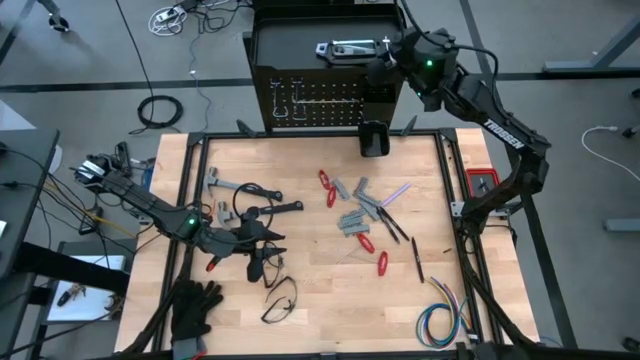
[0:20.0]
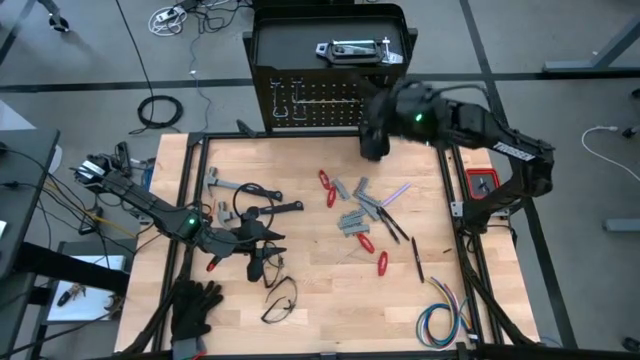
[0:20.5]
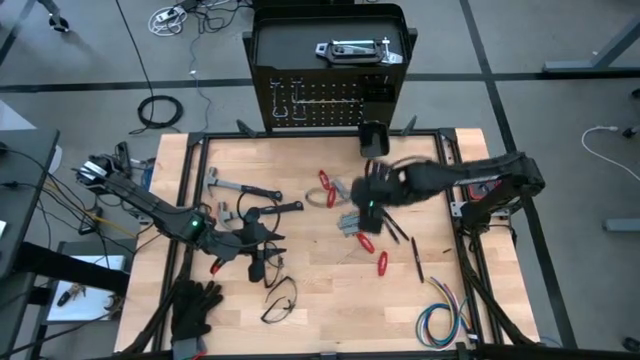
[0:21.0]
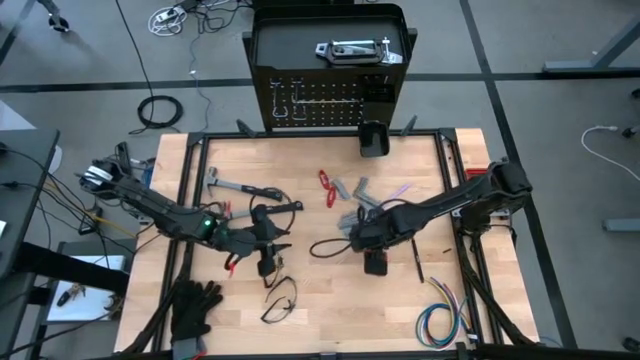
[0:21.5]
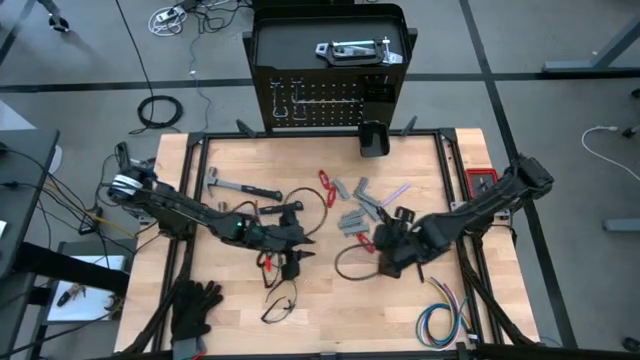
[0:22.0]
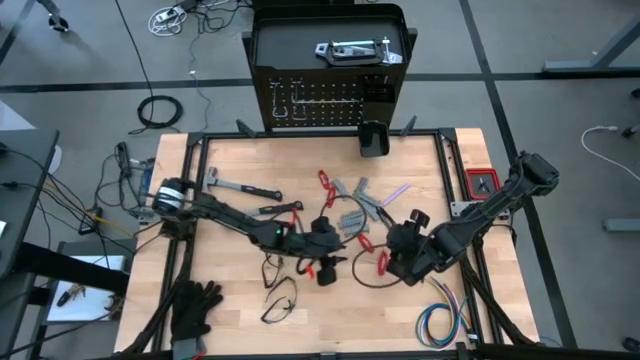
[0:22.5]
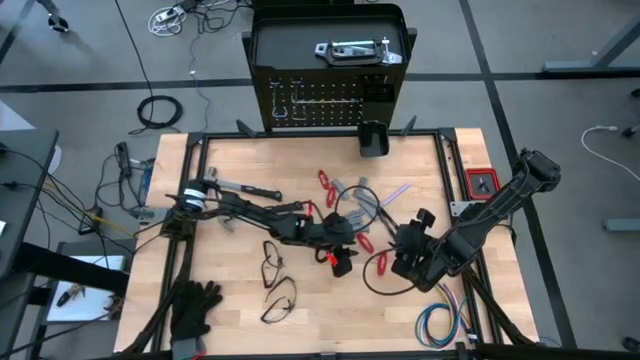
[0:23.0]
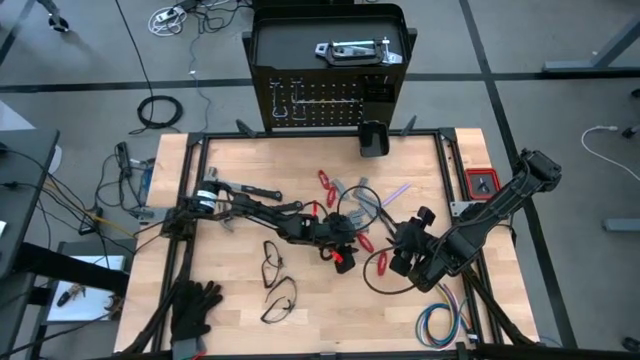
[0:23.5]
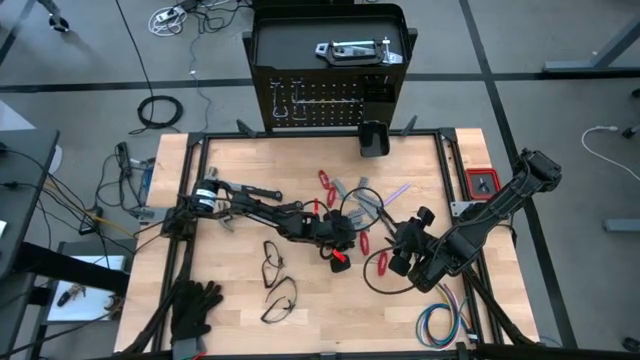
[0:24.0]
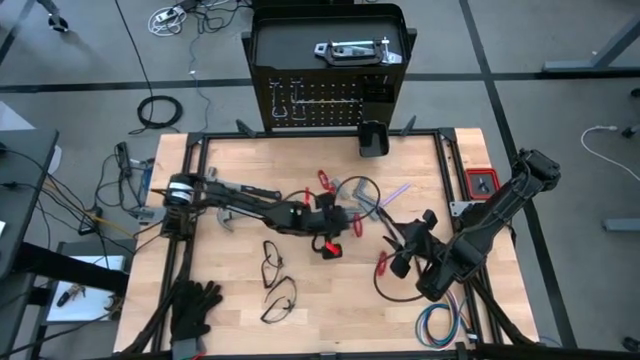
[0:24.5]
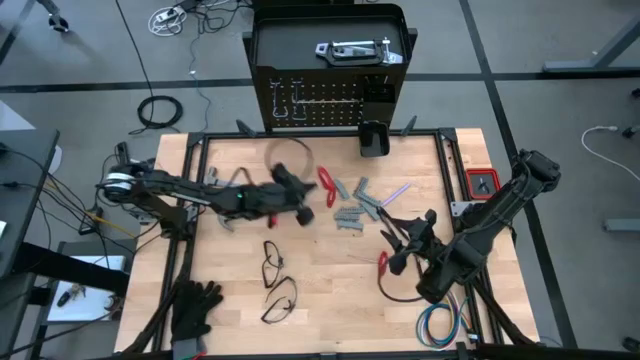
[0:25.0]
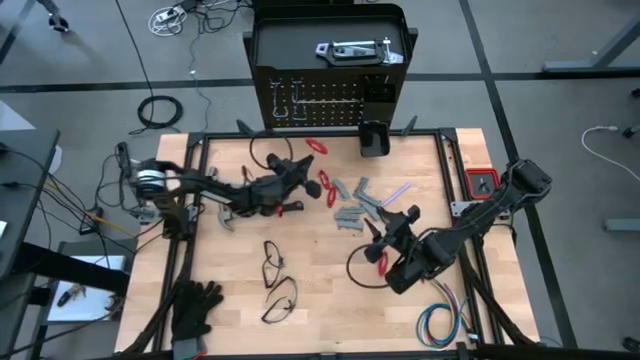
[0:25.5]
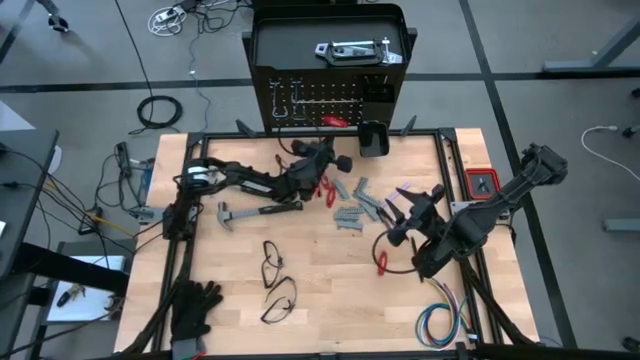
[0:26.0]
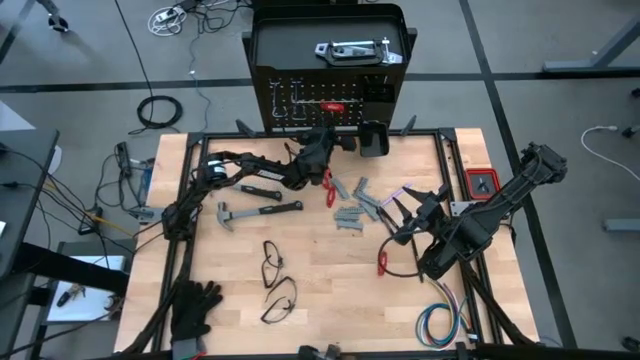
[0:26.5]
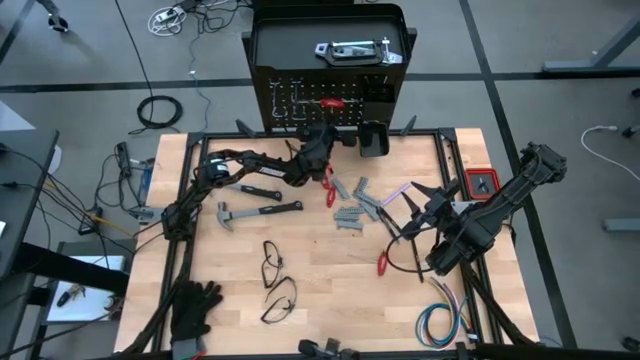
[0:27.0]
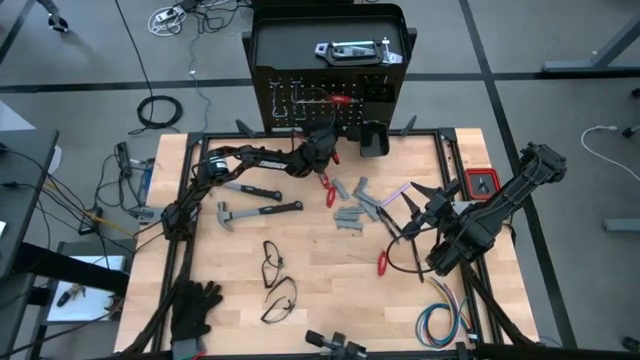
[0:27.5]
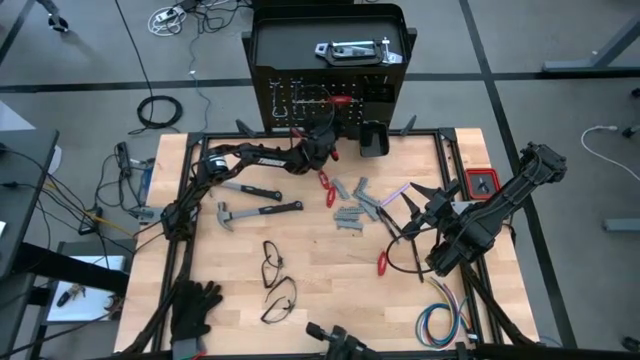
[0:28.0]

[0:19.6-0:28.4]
Task: Hang tools onto peg board
Hang the center T-shaped metric hex key on the pegboard

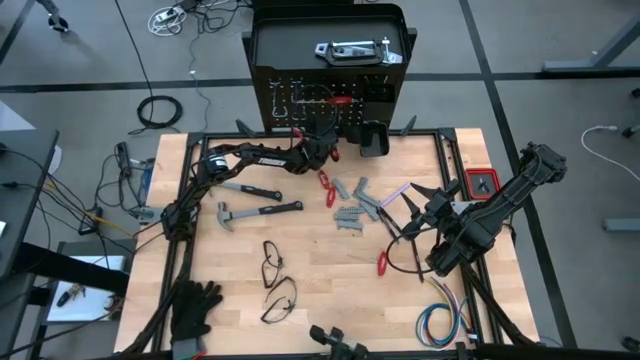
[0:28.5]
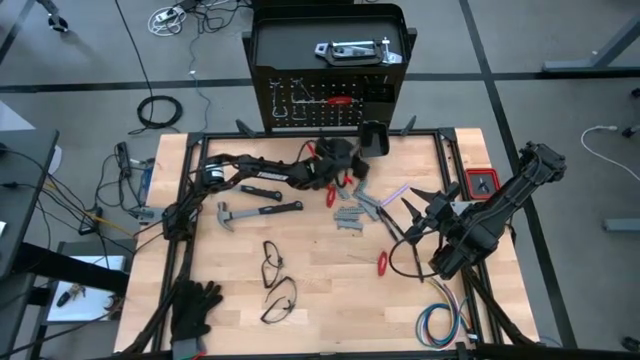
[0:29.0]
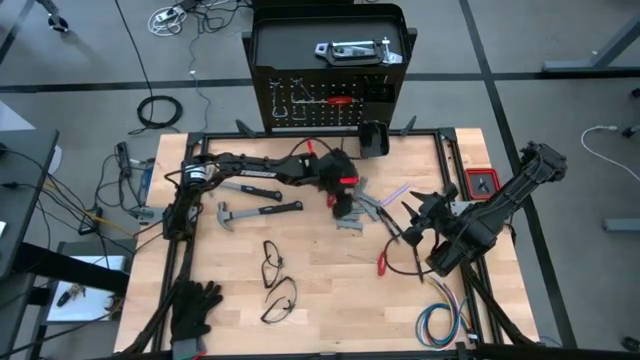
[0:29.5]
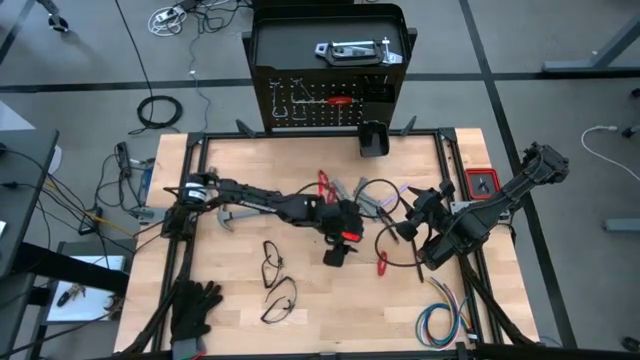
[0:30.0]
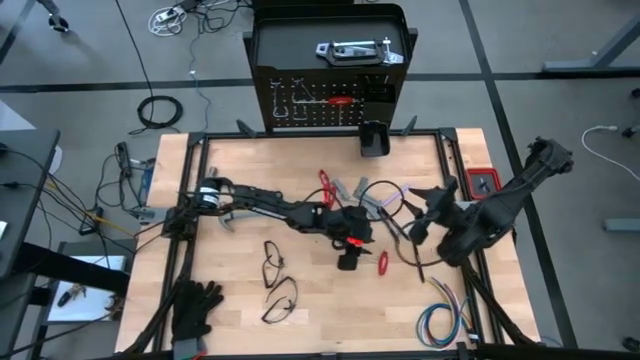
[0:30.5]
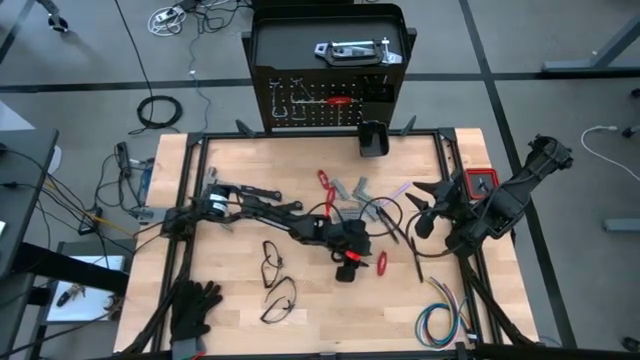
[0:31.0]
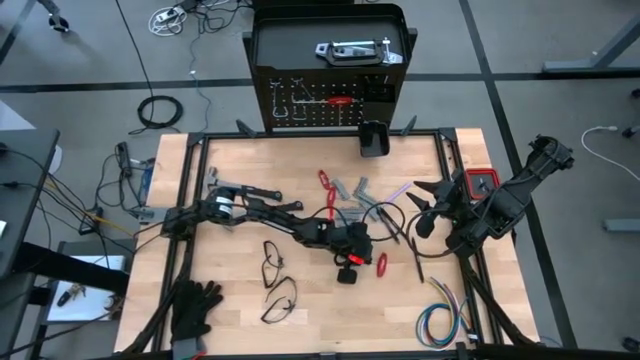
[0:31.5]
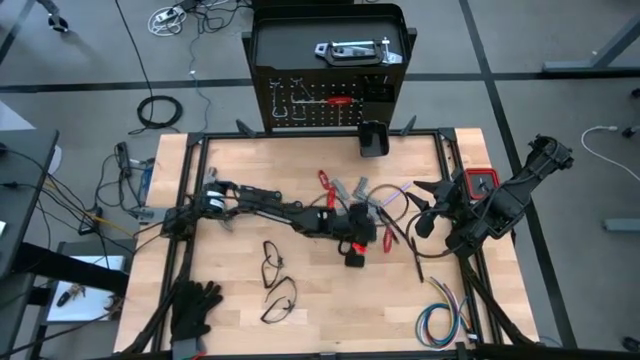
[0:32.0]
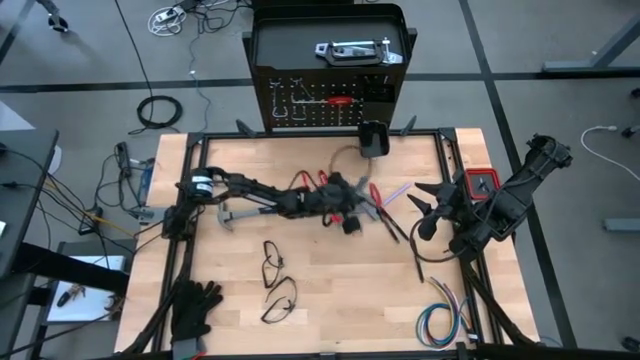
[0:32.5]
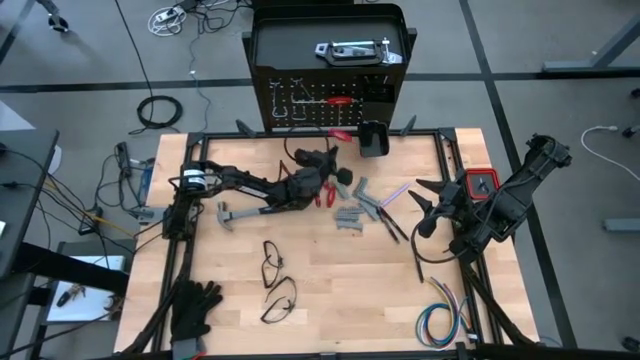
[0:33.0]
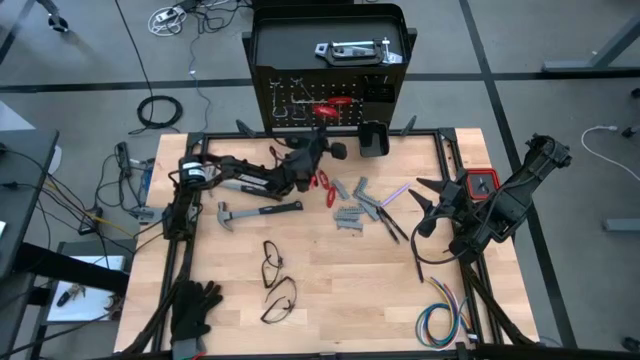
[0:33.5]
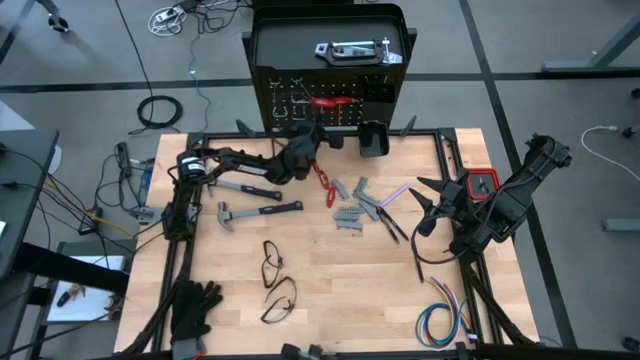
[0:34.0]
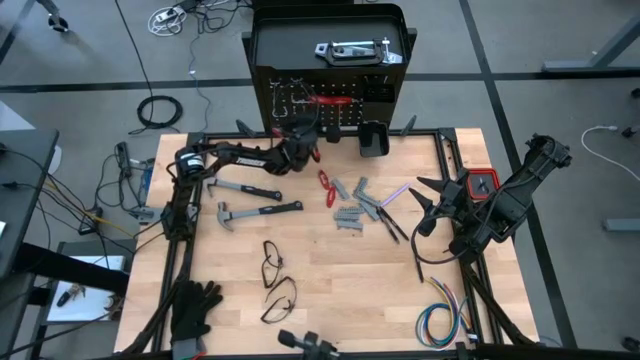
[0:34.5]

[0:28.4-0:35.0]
Hang the middle right T-shaped metric hex key on the pegboard

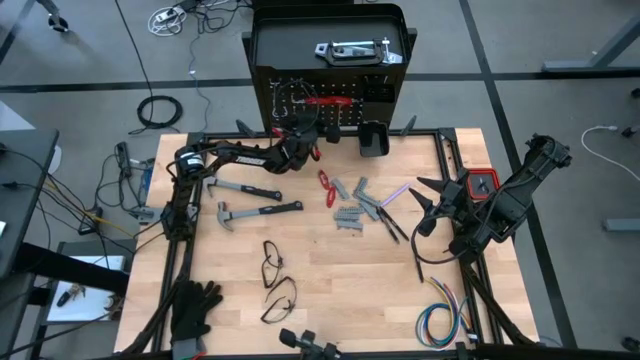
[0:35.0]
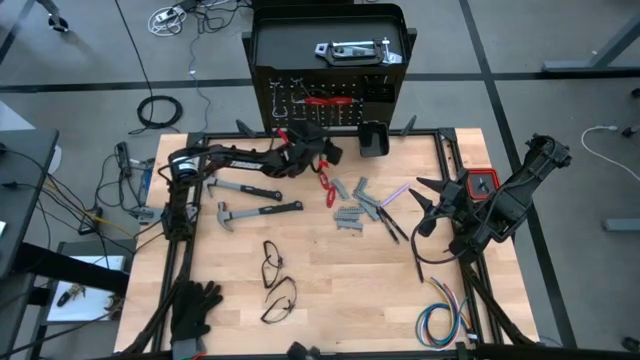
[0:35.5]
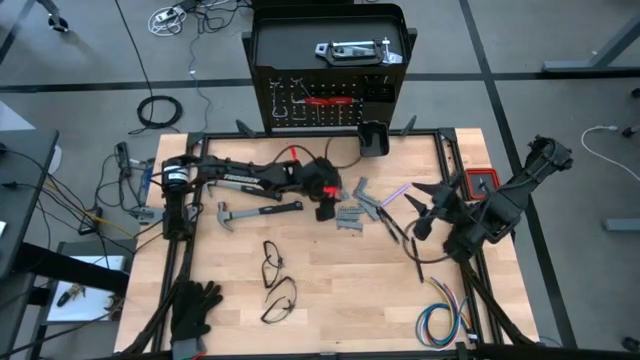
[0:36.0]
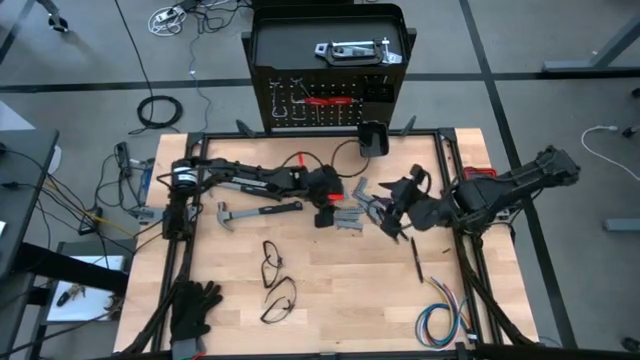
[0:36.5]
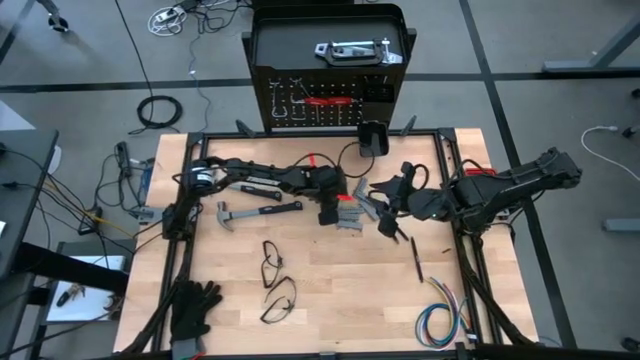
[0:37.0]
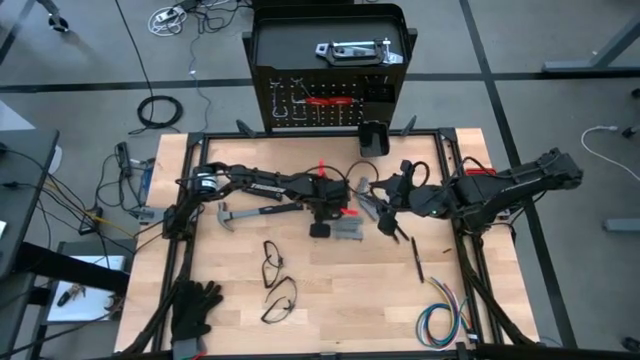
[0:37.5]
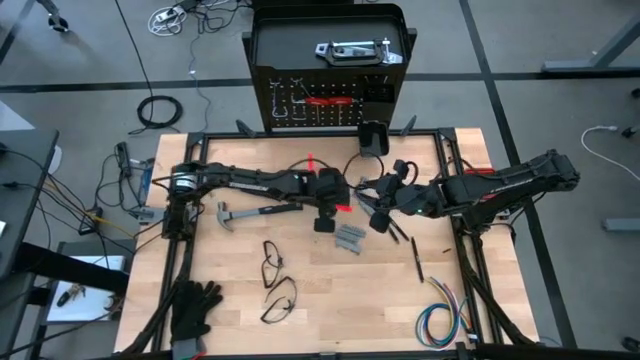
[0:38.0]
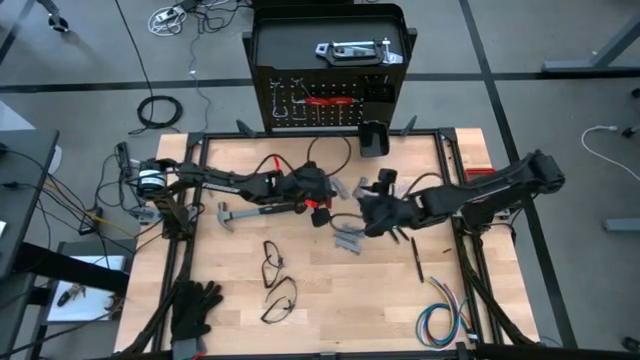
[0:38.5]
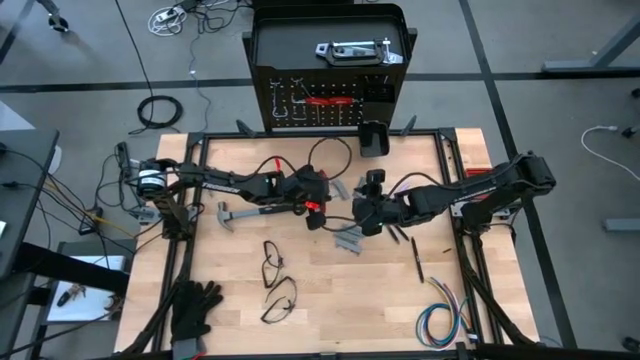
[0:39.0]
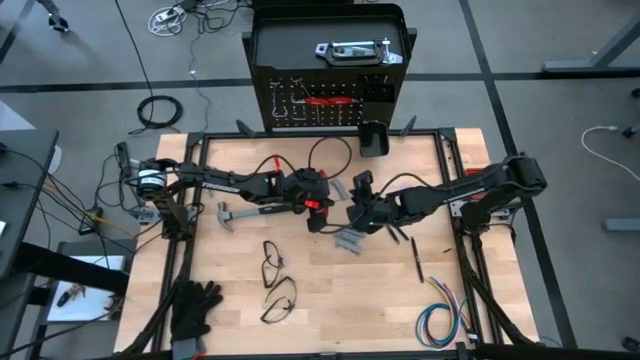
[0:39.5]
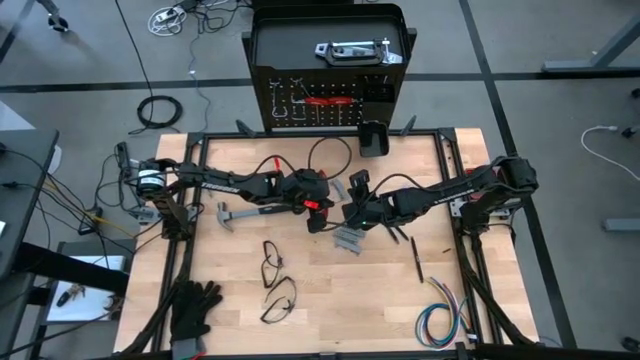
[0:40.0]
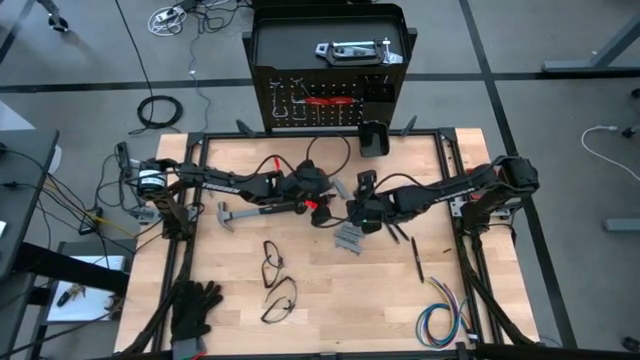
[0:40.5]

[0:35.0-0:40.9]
Hang the bottom T-shaped metric hex key on the pegboard
